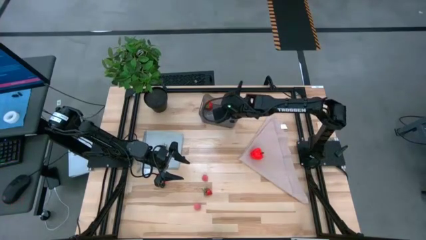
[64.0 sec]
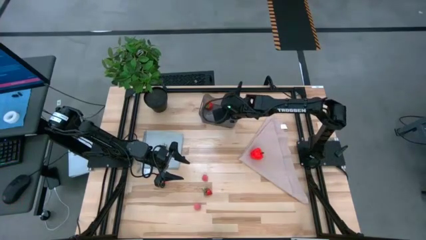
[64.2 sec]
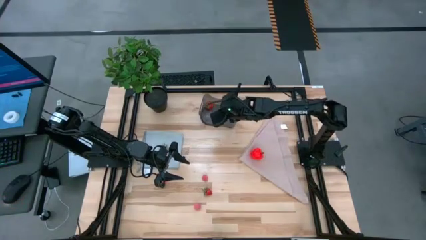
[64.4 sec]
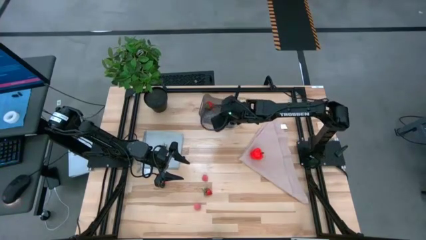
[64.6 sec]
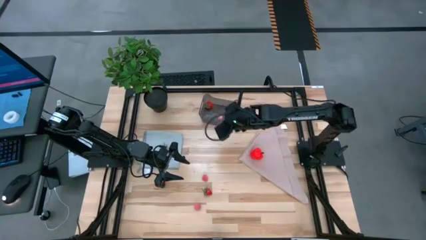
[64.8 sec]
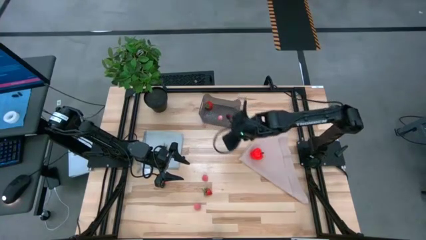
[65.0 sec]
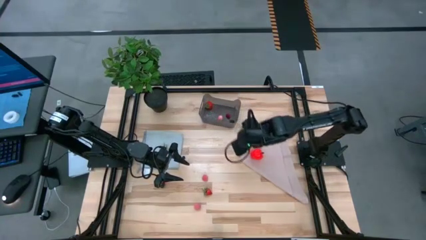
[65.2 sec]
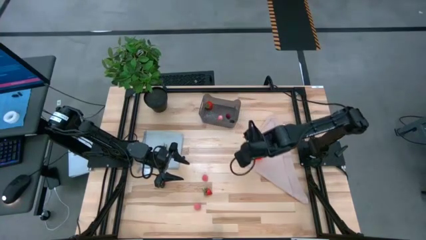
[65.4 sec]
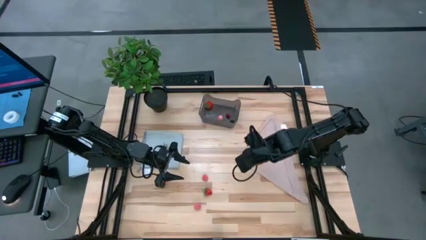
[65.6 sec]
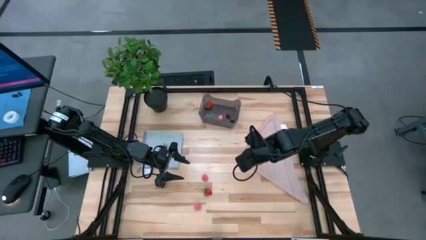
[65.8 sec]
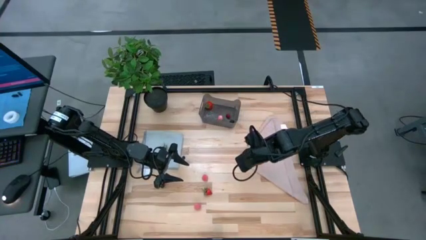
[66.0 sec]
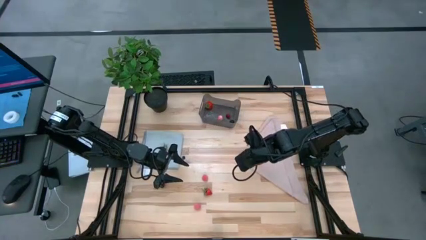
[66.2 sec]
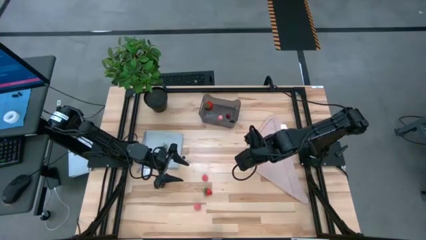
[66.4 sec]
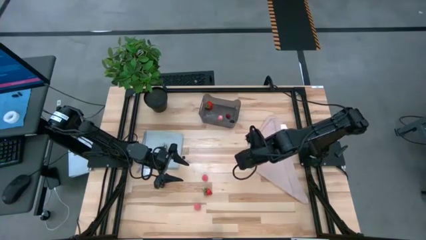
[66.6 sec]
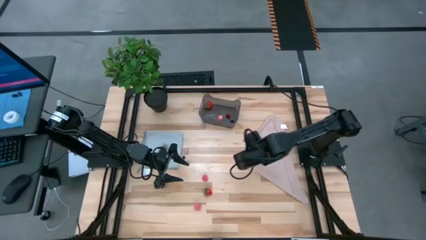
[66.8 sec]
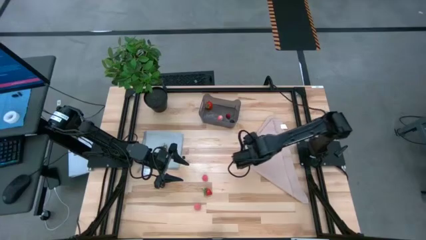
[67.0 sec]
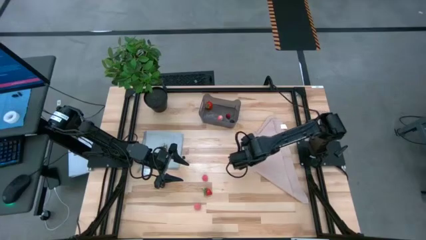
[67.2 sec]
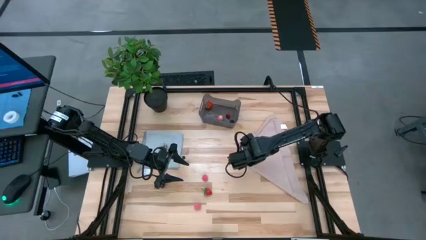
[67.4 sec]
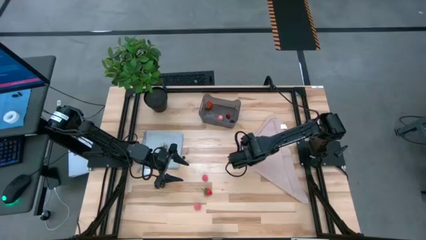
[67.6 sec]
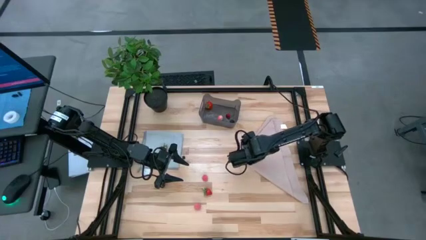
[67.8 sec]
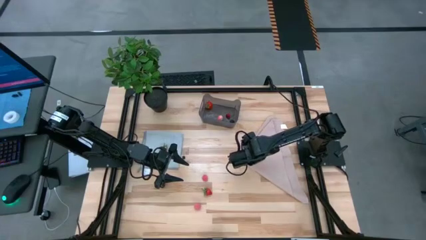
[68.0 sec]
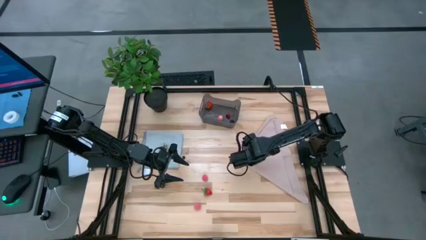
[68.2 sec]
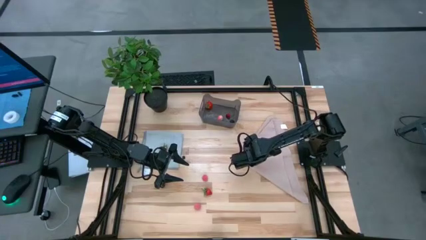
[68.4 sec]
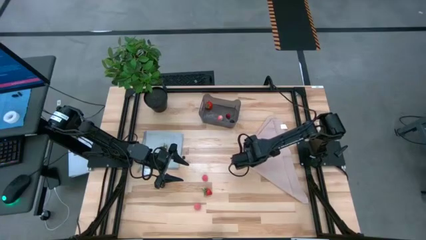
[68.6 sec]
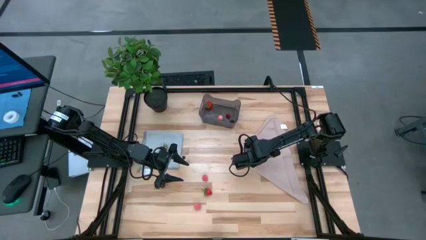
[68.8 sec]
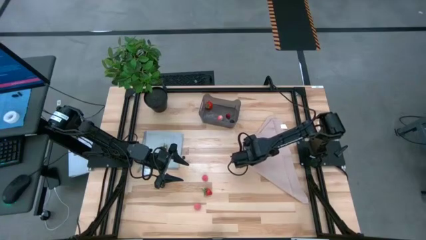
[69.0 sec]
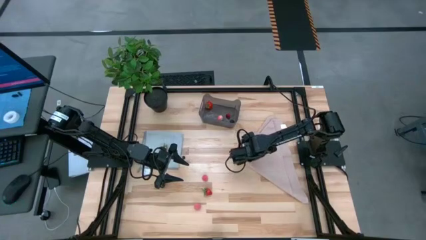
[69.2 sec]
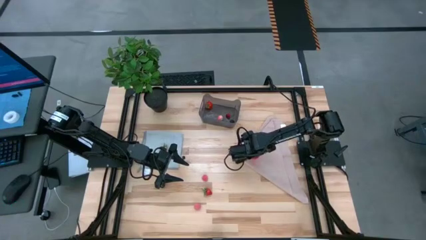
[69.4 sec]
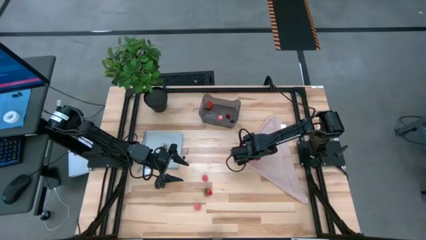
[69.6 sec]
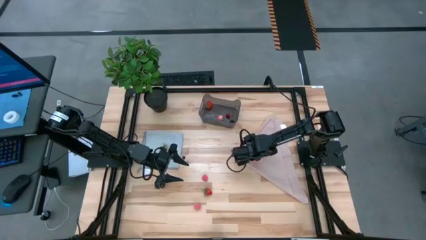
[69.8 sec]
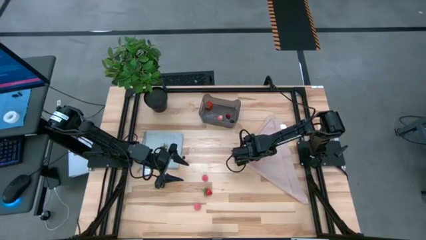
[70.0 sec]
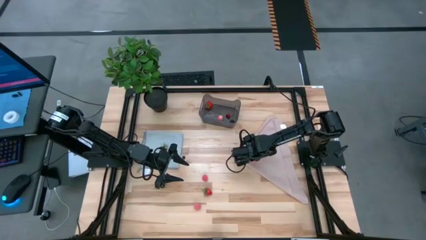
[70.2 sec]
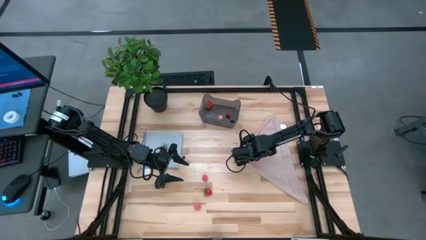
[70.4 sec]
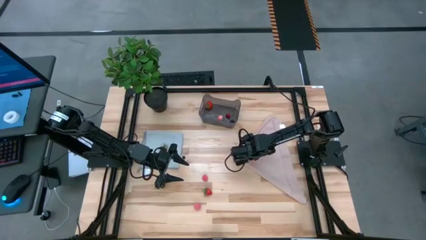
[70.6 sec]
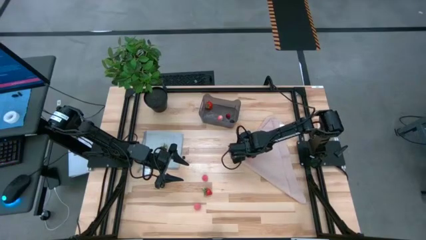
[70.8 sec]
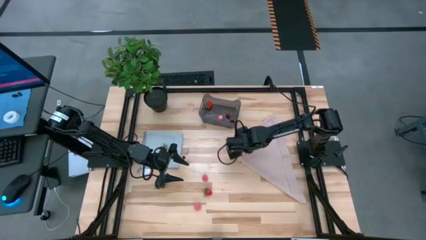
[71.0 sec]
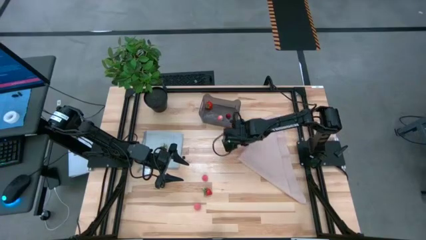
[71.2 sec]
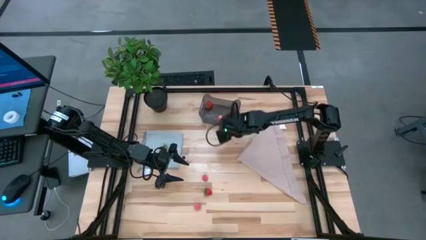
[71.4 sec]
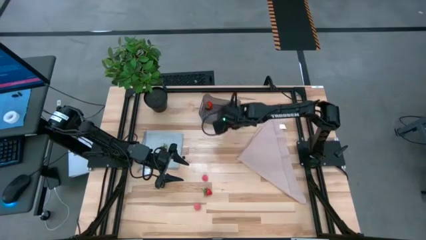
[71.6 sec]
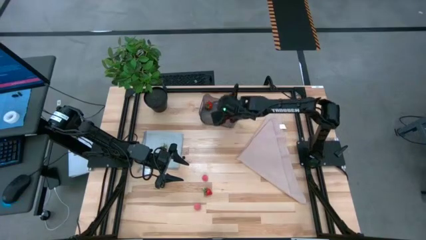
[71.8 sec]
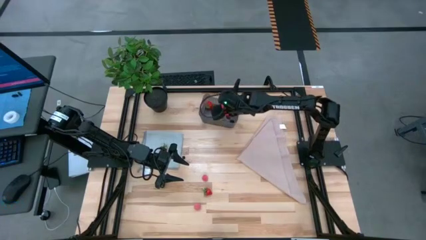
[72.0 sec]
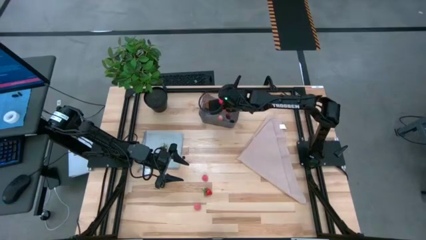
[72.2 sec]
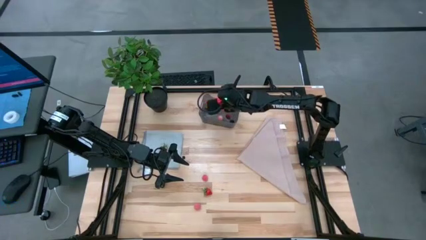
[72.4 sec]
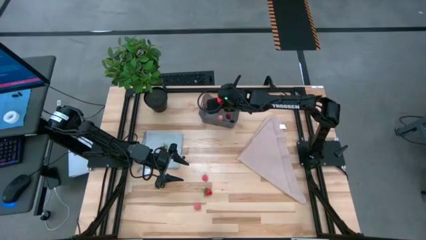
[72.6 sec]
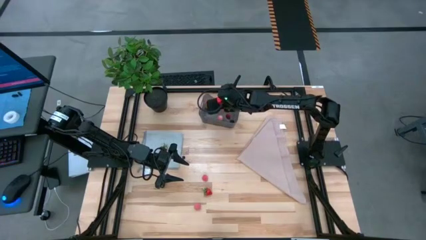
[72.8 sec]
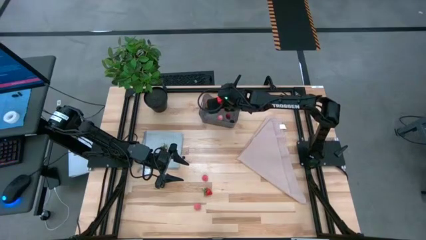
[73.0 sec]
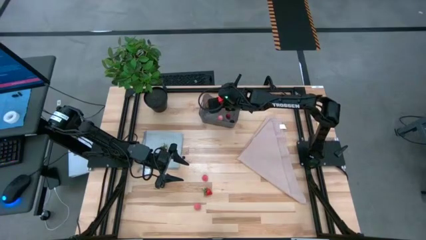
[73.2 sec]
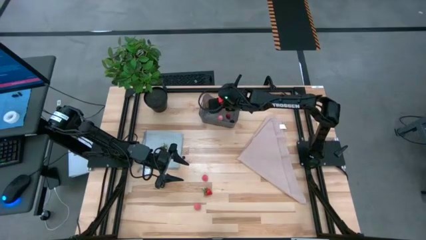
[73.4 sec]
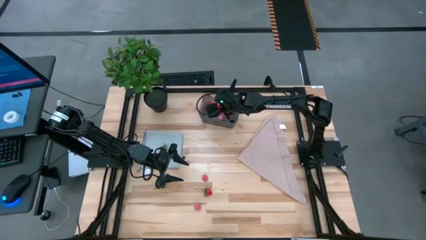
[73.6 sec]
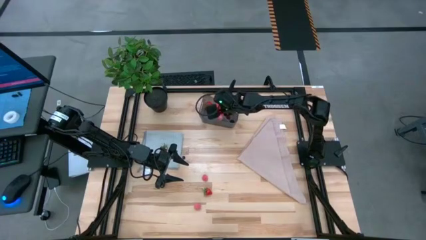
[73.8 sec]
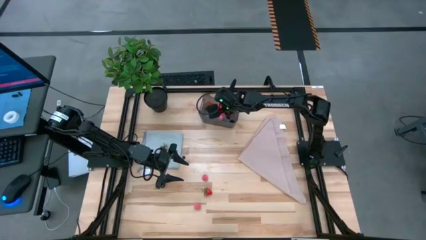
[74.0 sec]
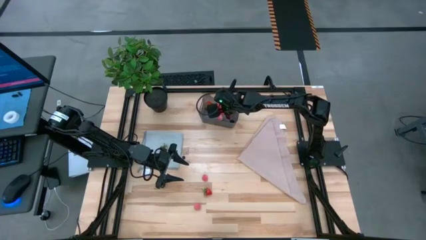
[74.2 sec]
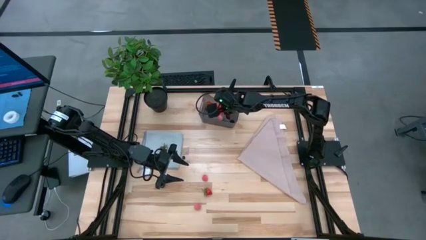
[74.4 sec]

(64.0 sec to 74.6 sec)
Task: Pick and placing Produce into tupperware
Put the apple into the black bin

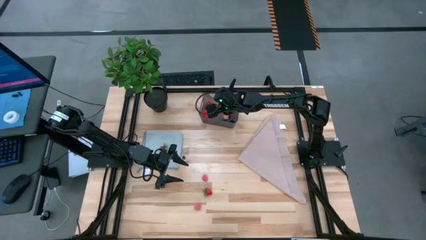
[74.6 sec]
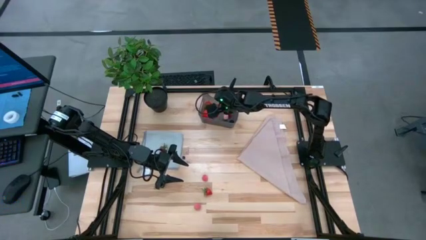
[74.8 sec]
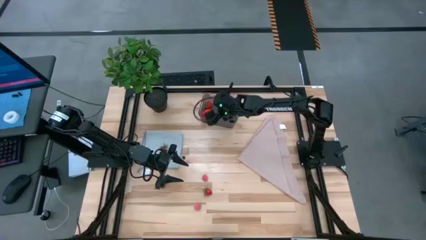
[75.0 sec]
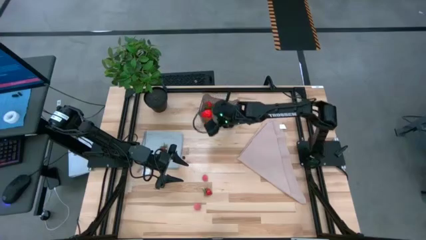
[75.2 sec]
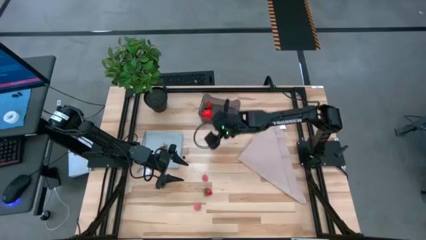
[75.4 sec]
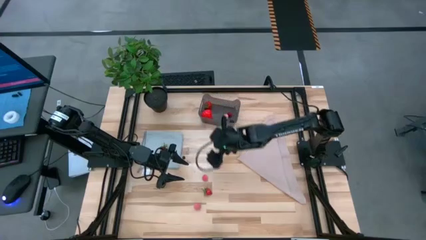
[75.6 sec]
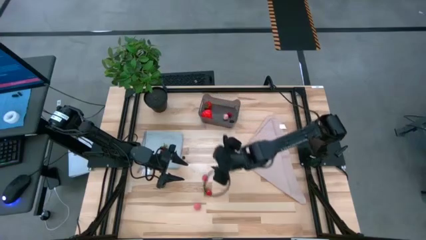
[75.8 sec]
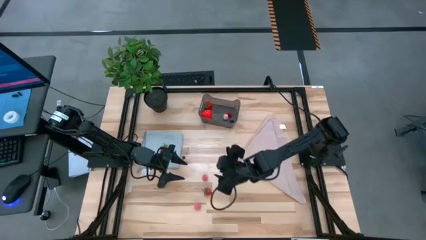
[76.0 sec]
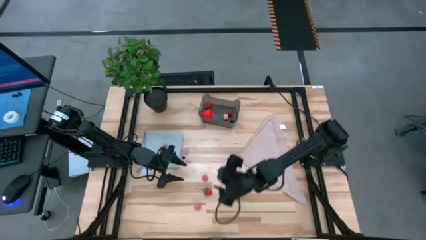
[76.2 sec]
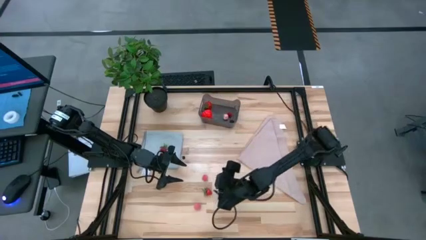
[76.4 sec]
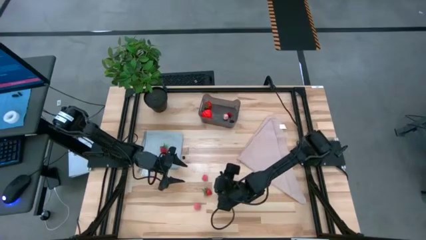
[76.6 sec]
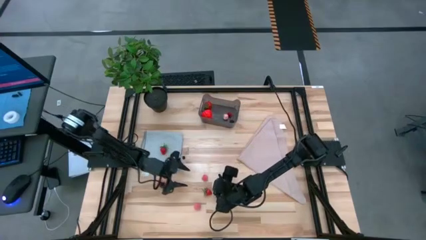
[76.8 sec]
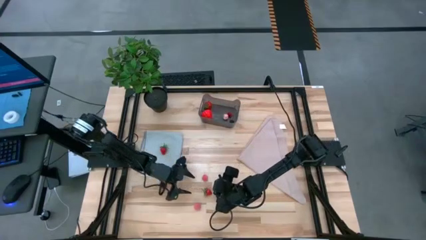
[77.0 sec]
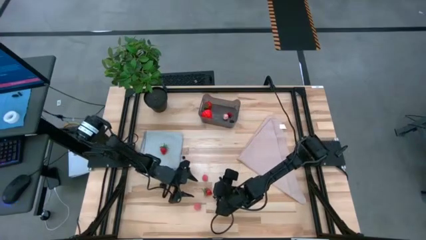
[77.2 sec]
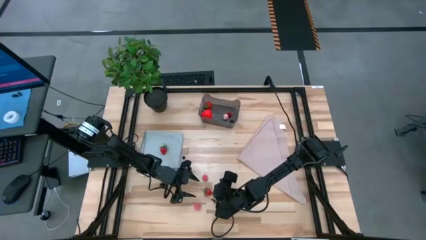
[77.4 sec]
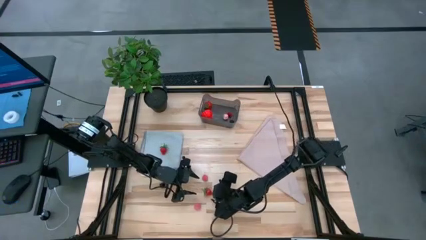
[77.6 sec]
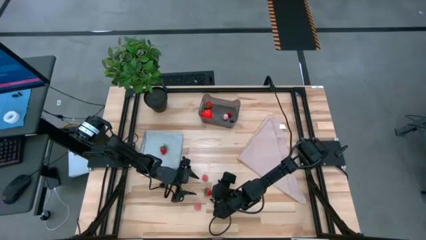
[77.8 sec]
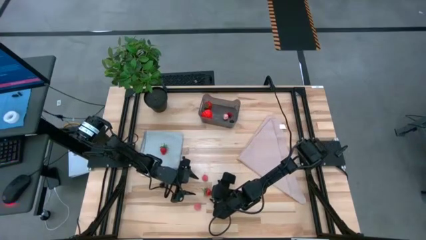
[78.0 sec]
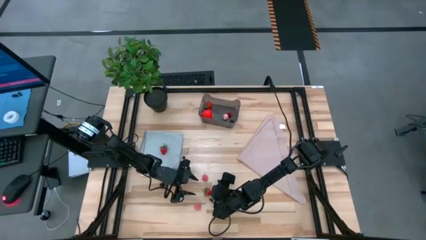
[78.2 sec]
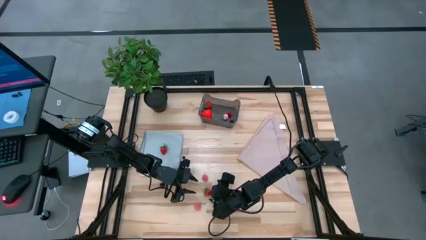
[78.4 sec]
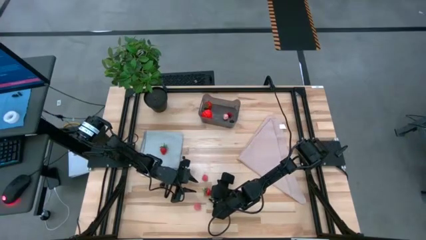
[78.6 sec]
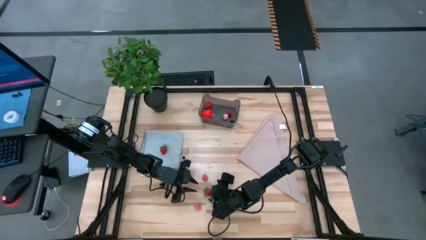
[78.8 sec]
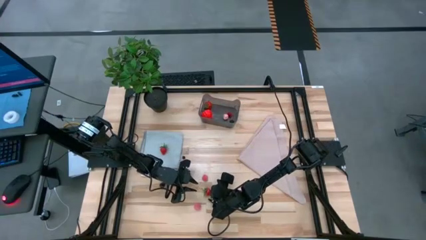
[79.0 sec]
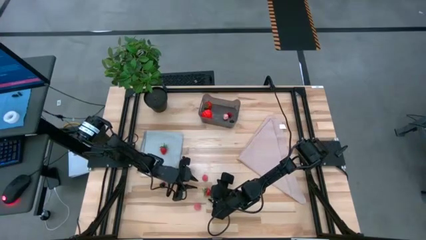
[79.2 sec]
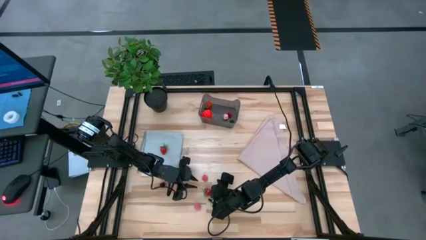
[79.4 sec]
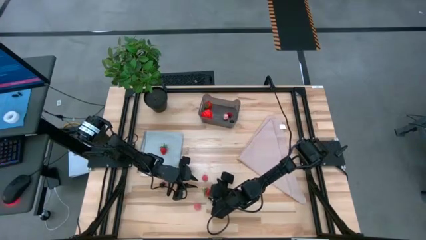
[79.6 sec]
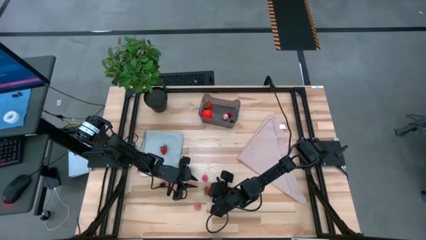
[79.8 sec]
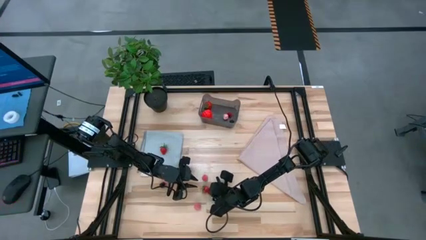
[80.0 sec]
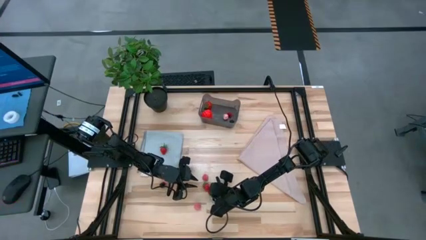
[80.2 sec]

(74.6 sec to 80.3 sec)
Put the strawberry into the black bin
